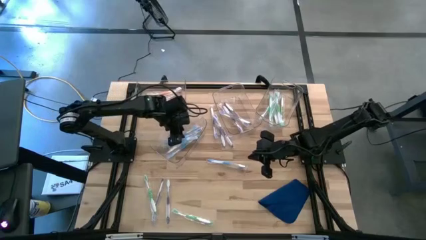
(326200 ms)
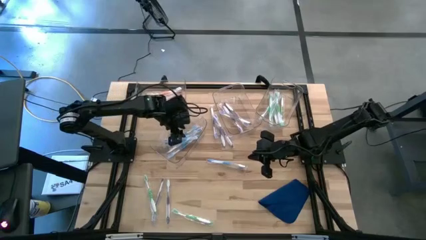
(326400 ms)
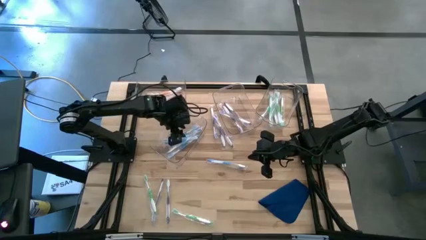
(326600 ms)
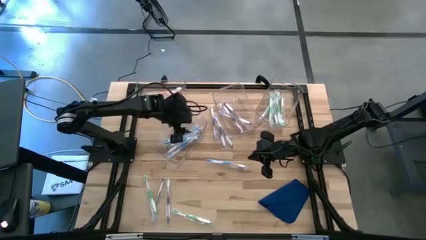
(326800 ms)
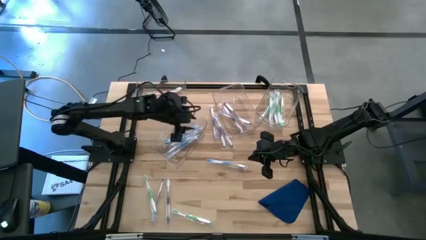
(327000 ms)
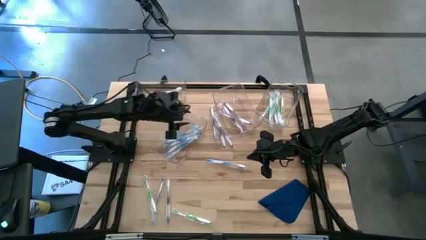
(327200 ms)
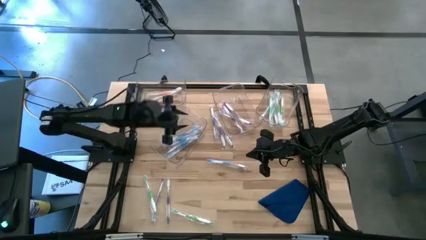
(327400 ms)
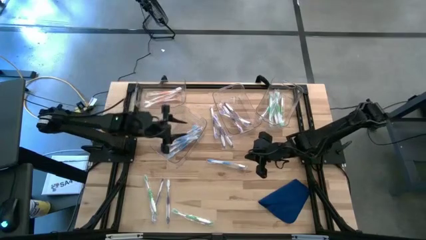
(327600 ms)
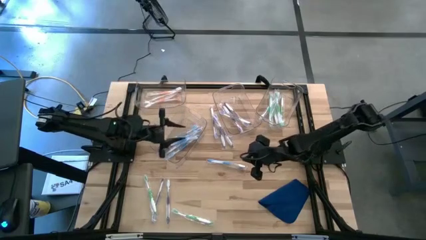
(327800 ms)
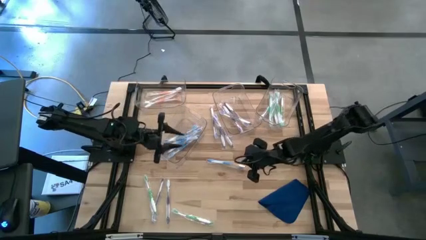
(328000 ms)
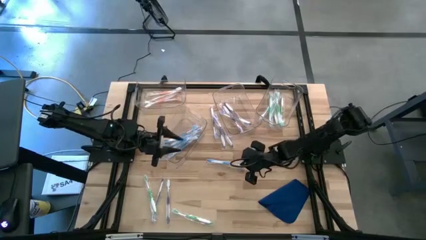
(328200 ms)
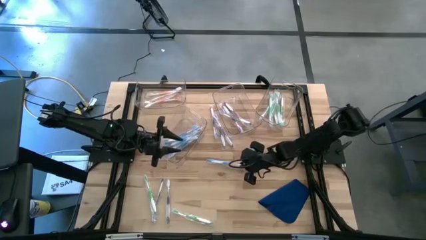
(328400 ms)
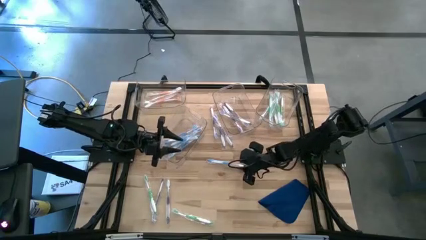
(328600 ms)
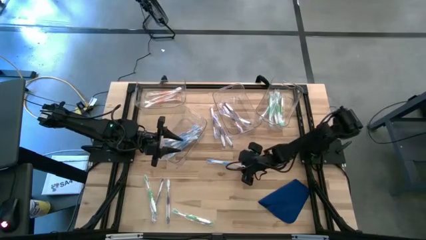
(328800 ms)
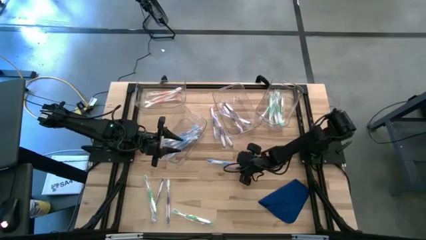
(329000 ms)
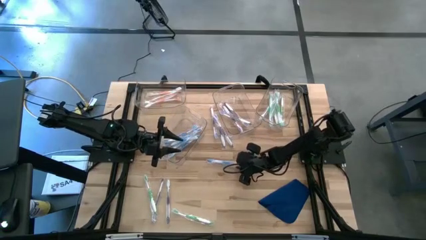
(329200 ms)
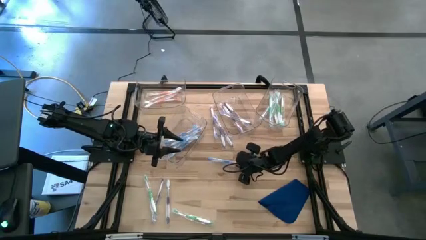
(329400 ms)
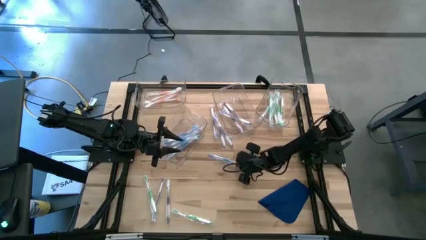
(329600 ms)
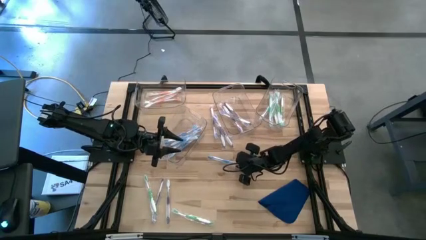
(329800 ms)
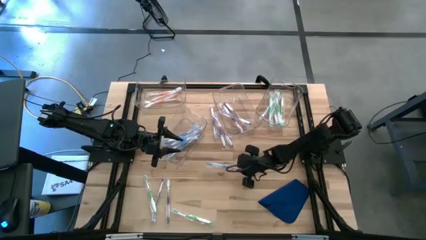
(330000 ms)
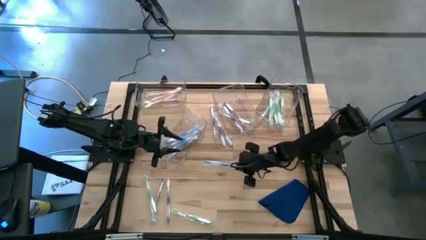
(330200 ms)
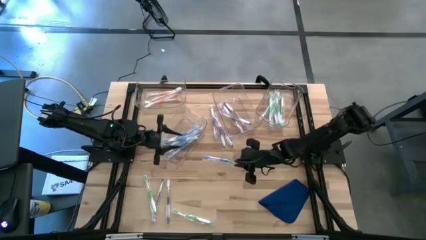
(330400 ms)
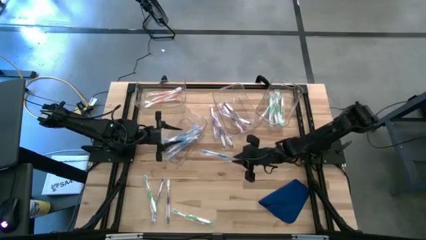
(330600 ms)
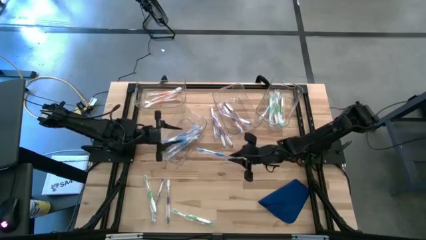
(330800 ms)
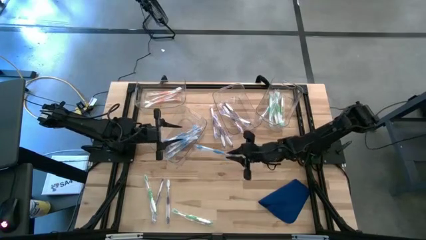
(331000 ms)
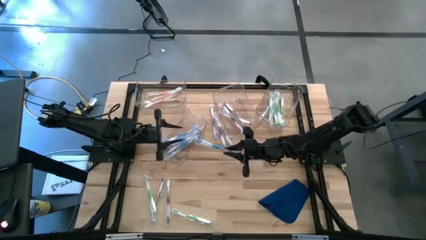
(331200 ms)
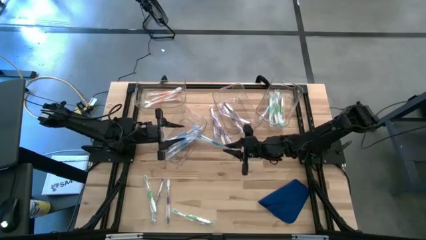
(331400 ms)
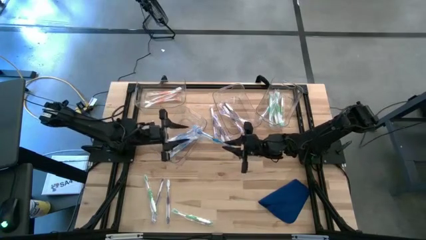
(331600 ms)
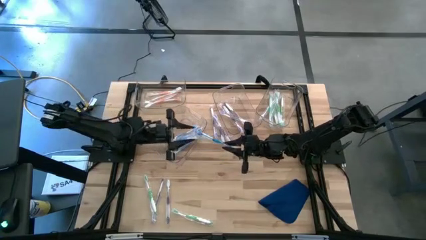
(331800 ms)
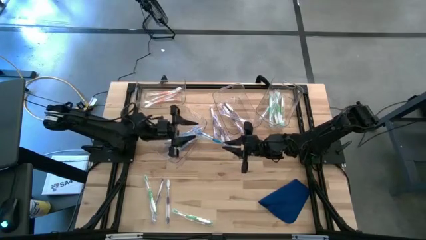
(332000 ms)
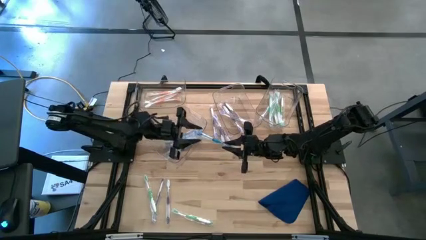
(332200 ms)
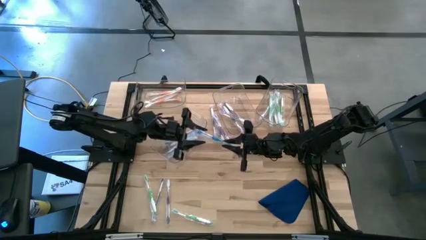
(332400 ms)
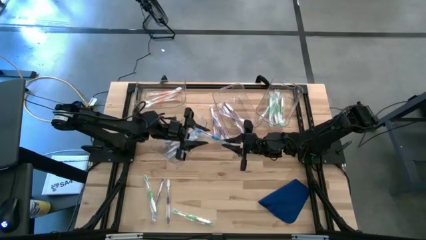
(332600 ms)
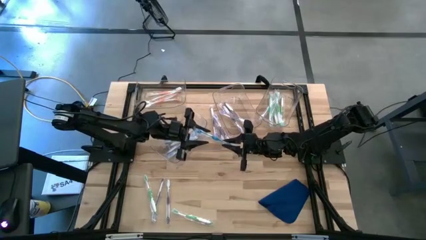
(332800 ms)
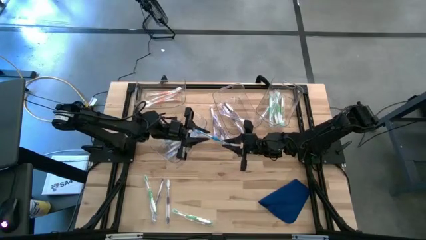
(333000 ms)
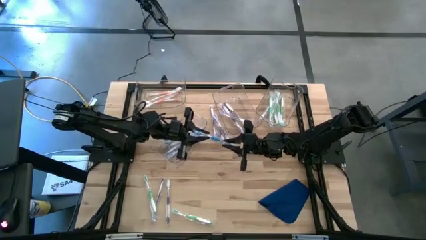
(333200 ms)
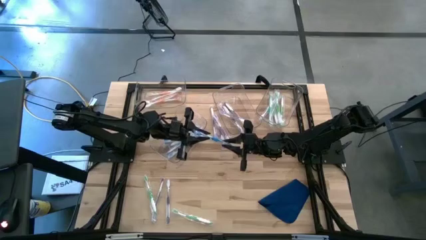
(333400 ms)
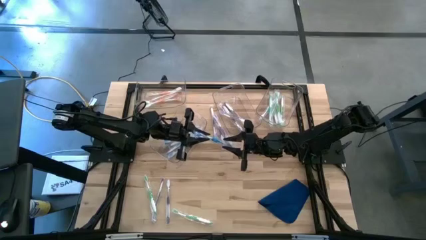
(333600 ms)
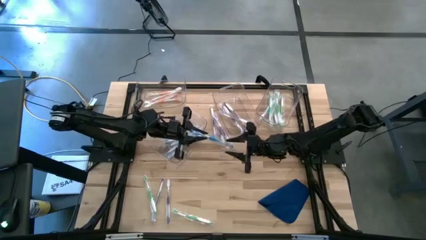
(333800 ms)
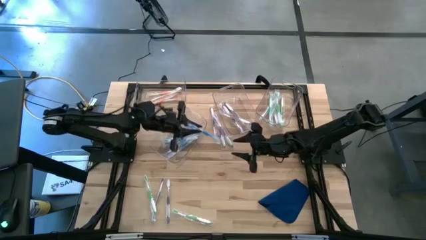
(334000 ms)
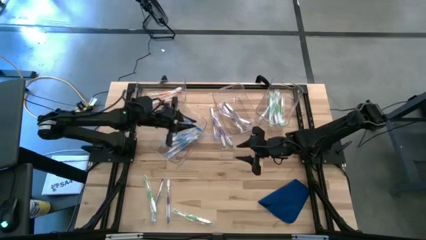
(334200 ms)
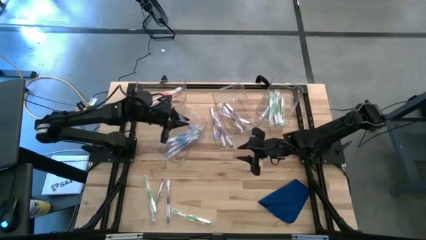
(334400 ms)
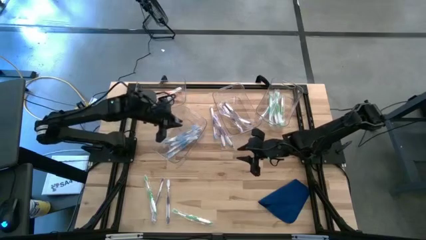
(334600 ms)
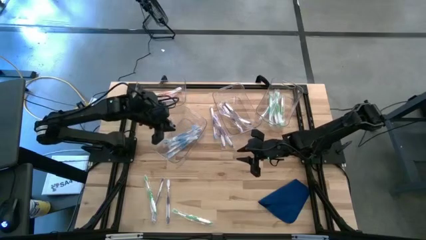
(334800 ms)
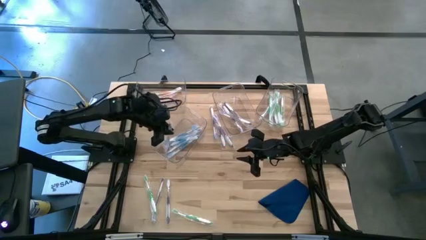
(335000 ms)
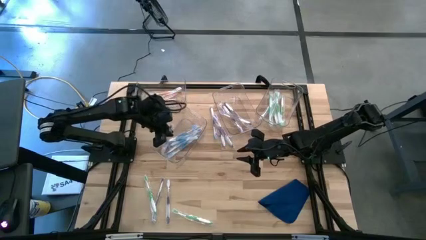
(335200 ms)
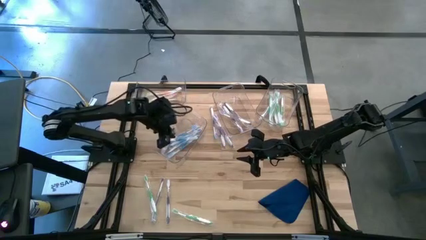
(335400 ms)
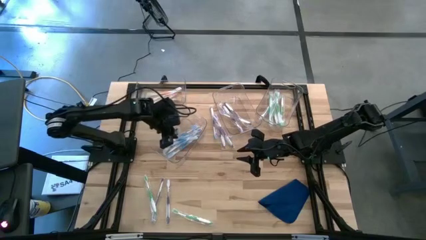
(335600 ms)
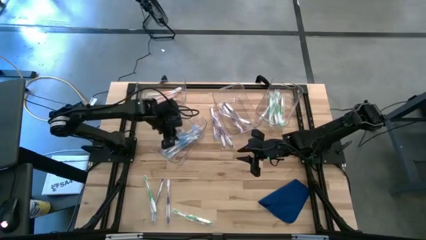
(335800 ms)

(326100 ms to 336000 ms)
Task: Pick & Place Toothbrushes
Put the blue toothbrush into the bottom transparent bin

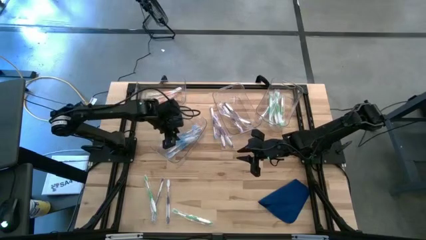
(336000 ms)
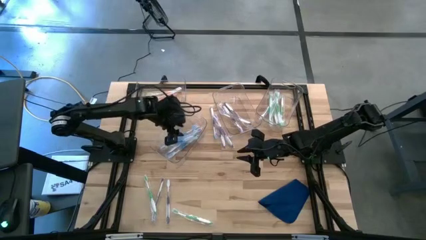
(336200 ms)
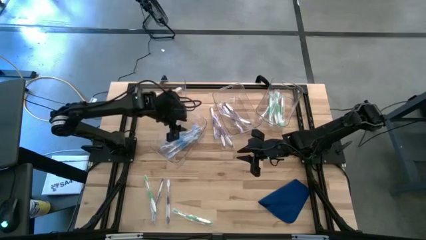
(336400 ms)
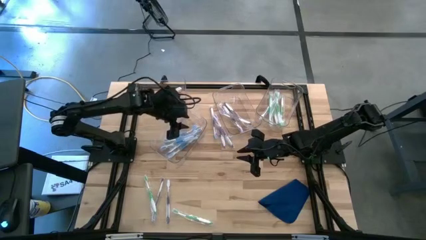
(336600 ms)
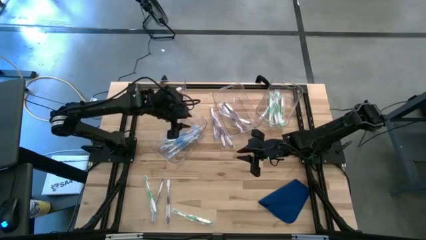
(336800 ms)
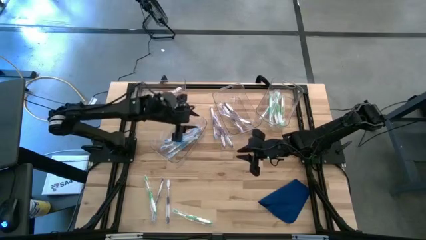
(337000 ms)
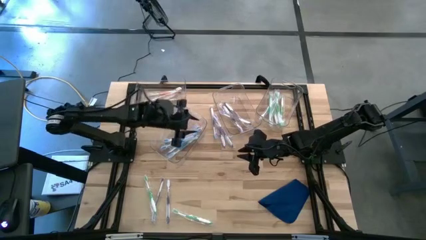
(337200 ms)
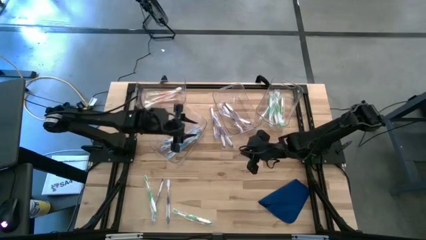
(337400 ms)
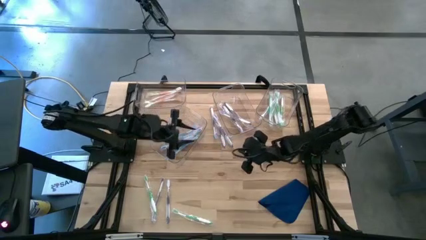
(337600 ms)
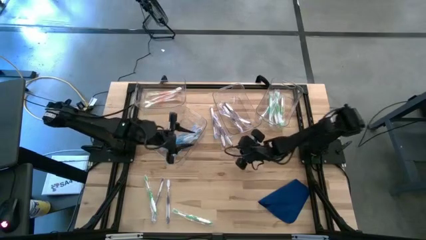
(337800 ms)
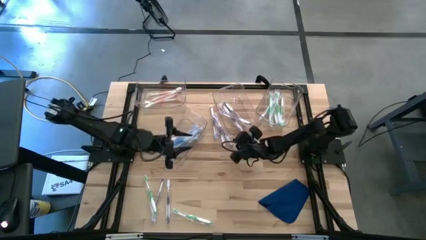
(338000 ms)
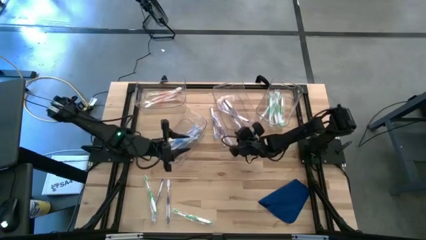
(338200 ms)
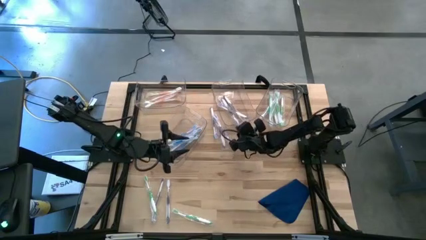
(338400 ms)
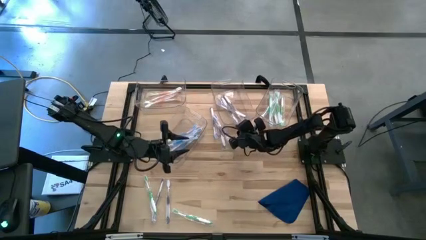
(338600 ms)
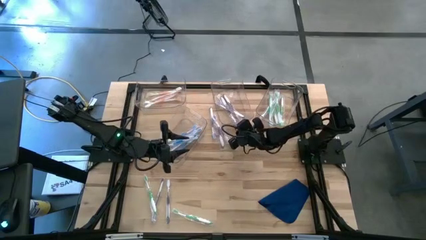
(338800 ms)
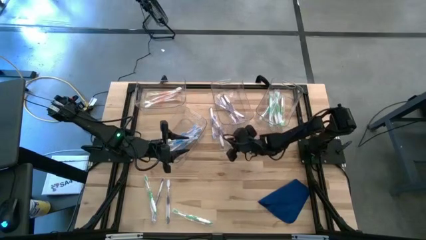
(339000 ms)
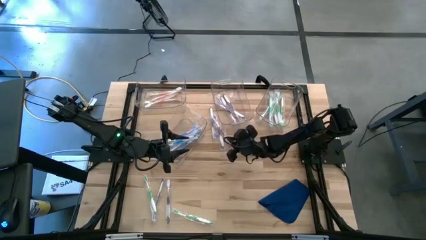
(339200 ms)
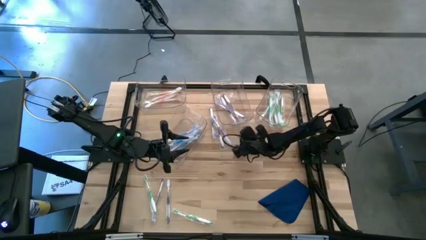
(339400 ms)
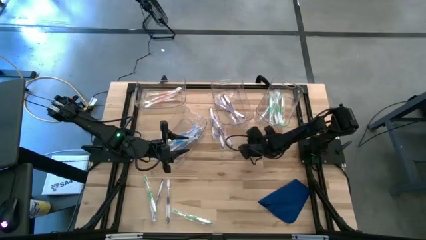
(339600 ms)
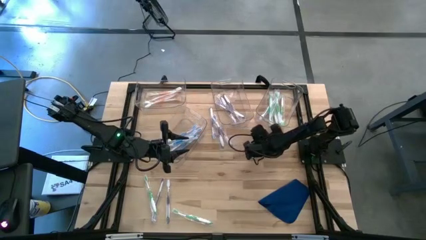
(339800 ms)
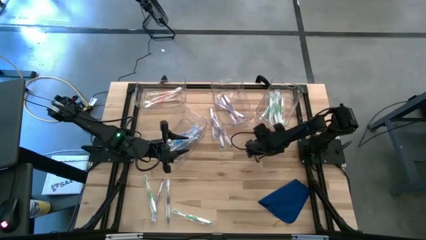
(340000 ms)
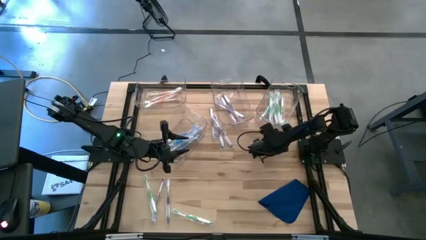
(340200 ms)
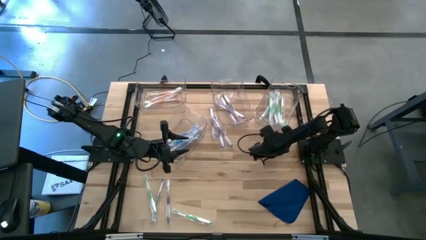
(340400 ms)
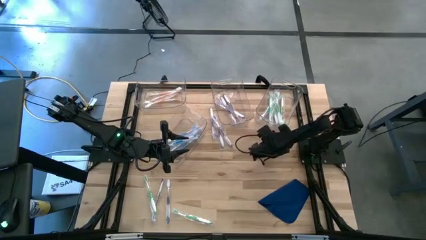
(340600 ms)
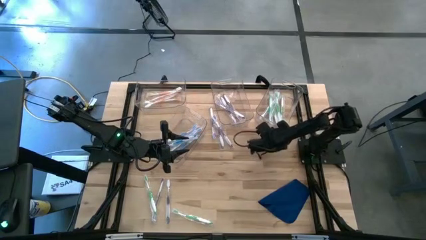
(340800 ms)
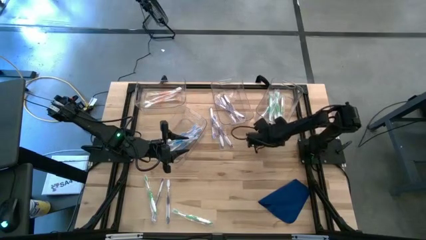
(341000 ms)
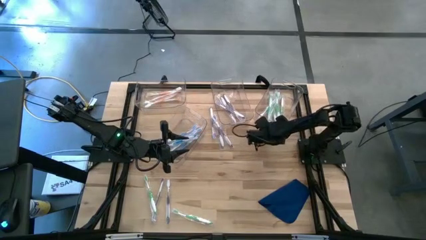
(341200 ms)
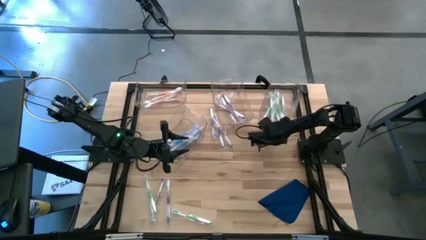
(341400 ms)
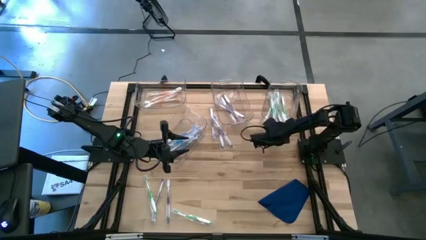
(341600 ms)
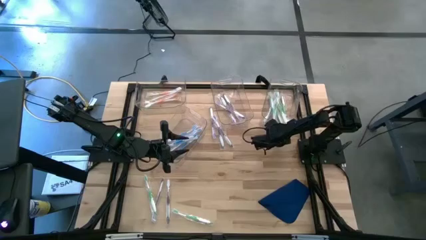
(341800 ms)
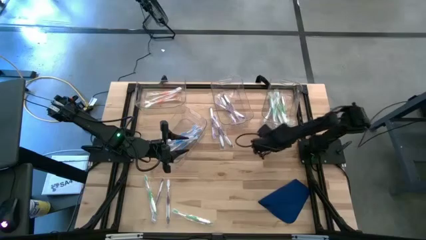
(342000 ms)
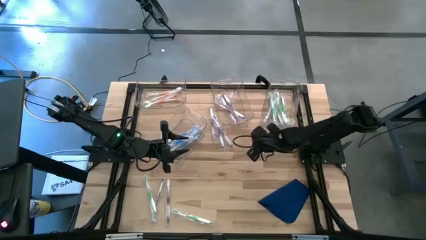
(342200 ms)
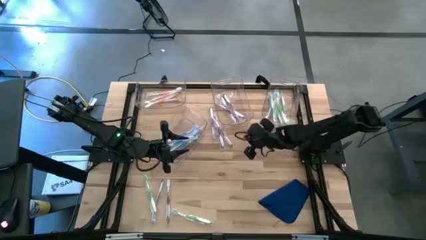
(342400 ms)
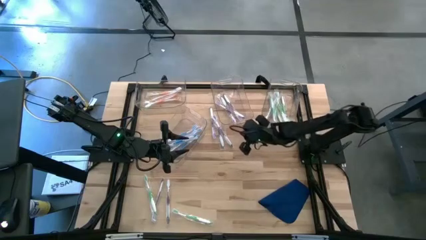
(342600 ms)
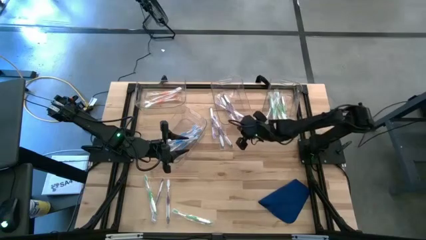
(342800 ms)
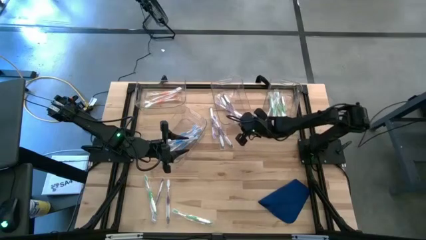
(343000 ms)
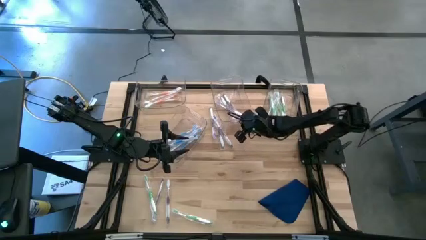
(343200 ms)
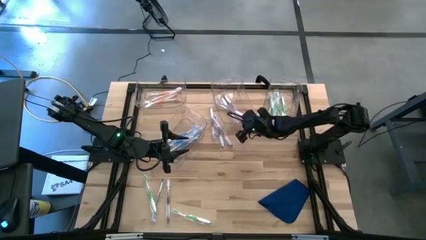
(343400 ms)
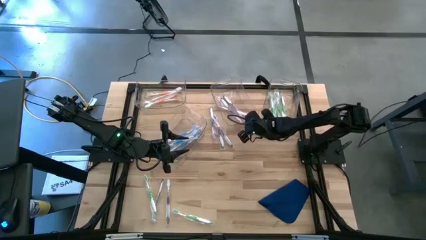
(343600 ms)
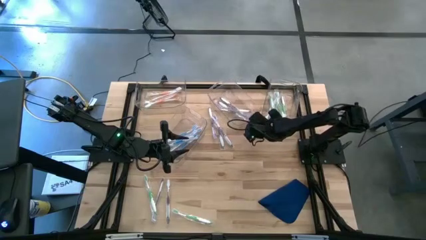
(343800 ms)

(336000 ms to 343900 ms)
Adjust the top center transparent bins from the table
